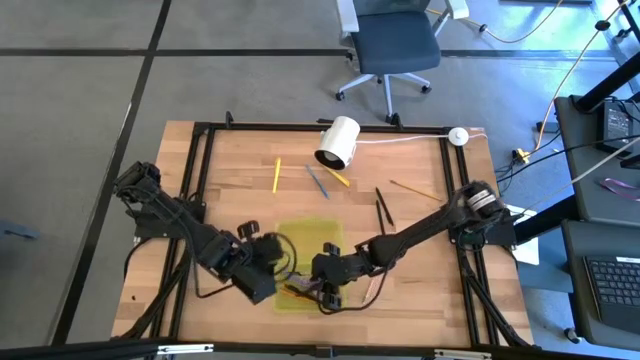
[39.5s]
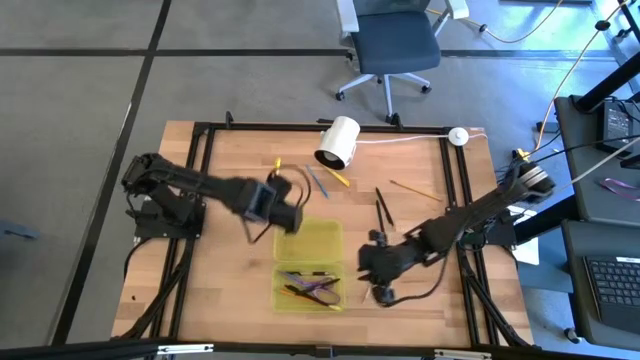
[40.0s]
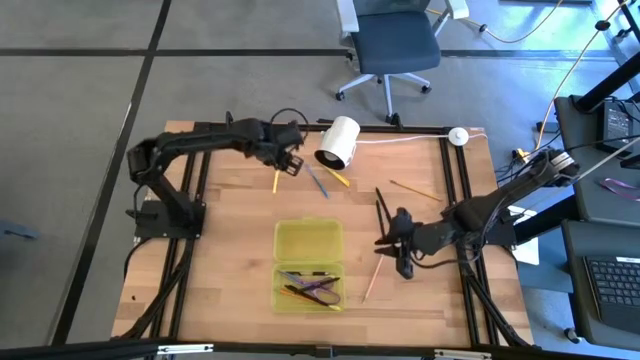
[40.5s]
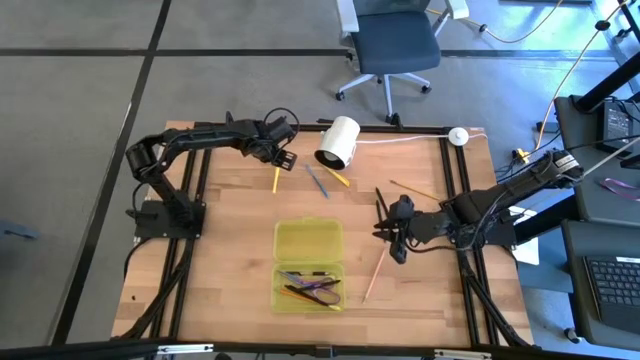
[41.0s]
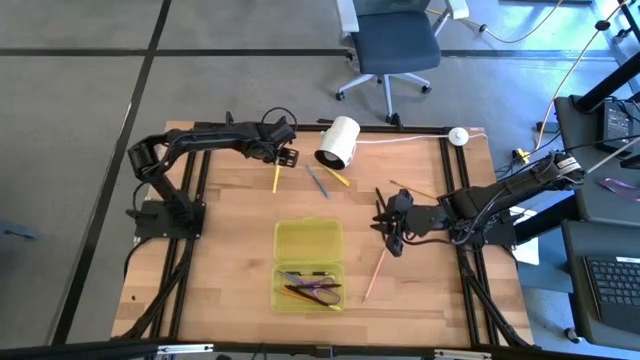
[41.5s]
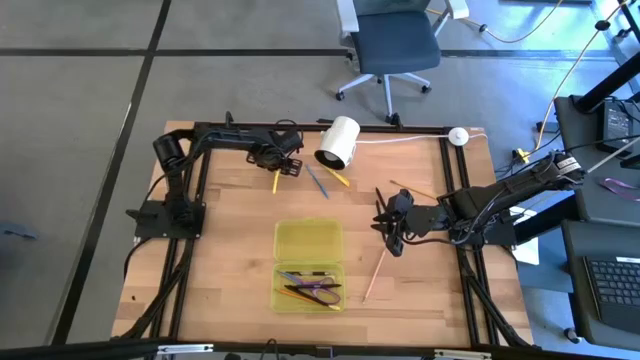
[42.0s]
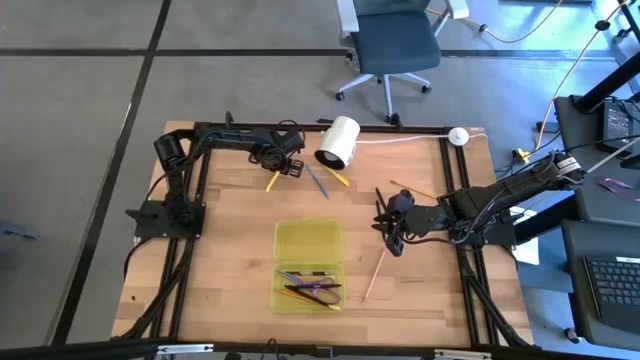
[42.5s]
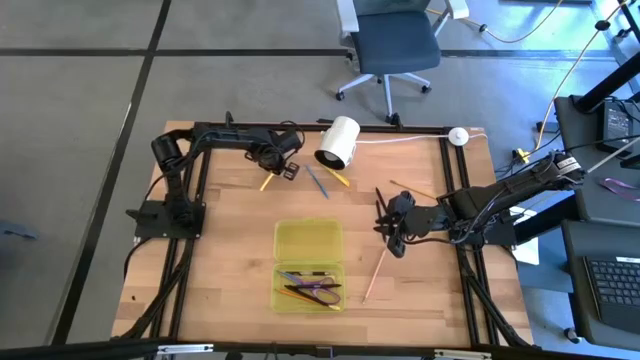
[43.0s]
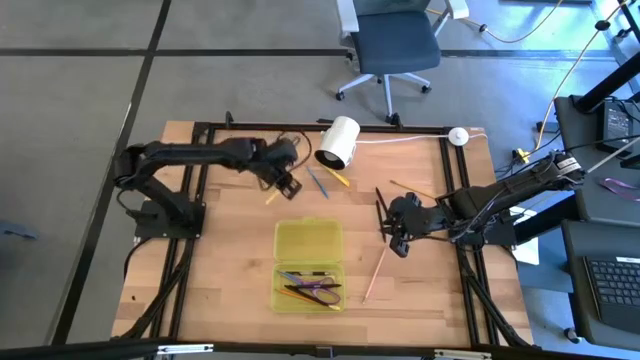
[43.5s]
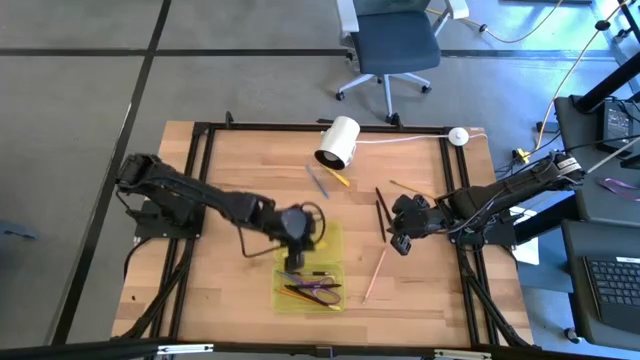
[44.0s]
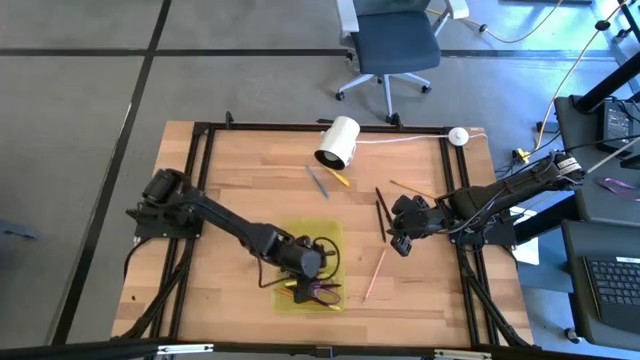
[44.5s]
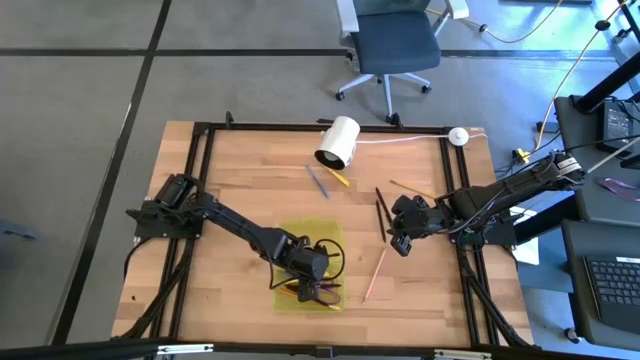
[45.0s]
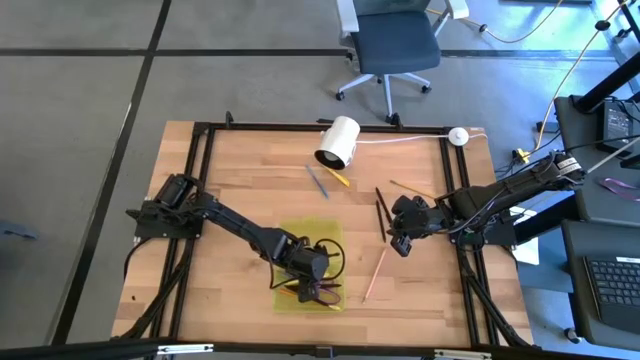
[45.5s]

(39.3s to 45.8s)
Task: Pick & place school supplies into a supply box
Put the yellow pen into the yellow supply box

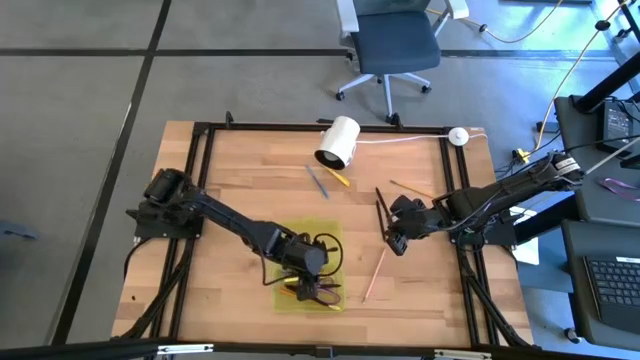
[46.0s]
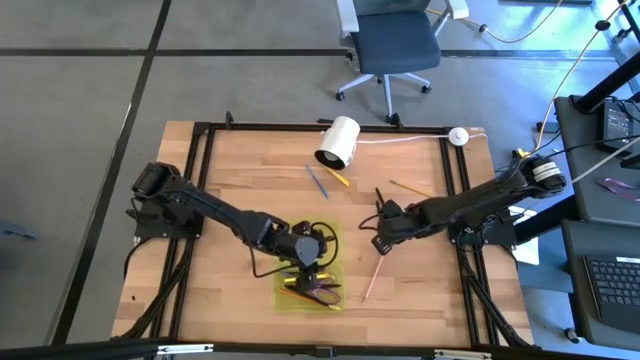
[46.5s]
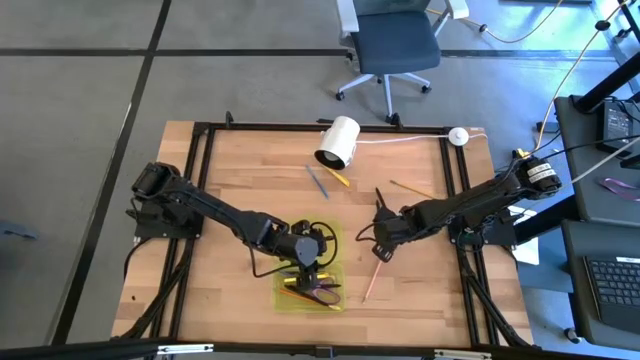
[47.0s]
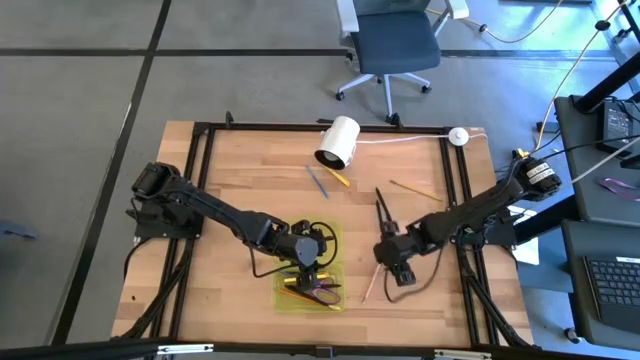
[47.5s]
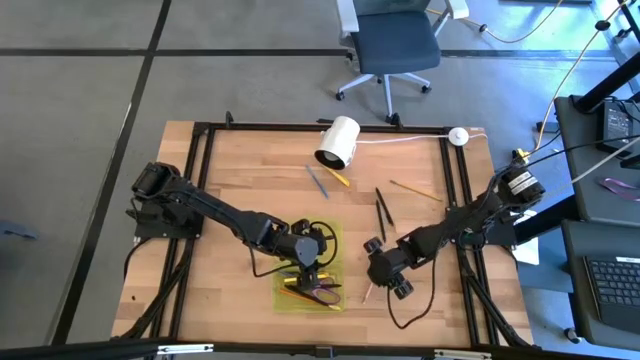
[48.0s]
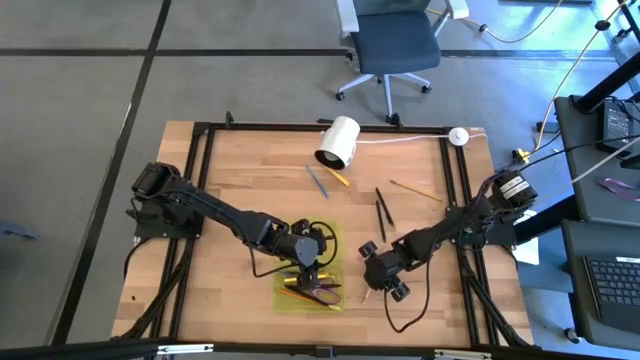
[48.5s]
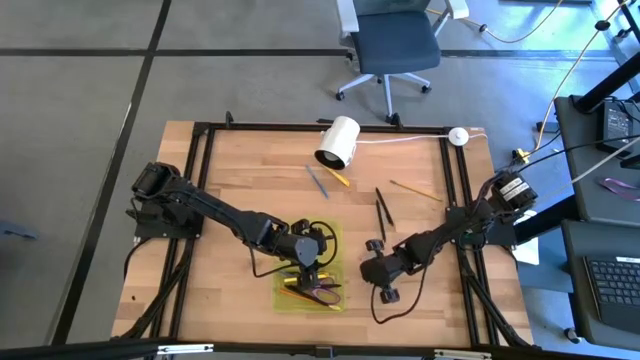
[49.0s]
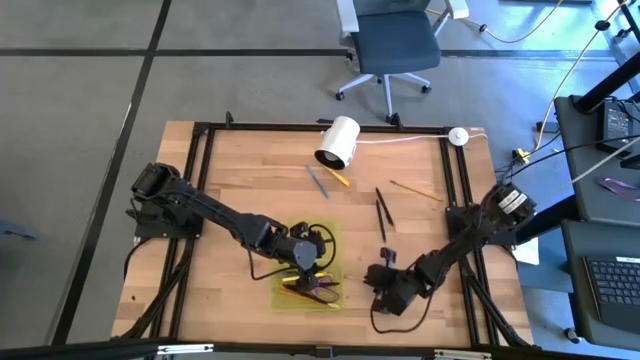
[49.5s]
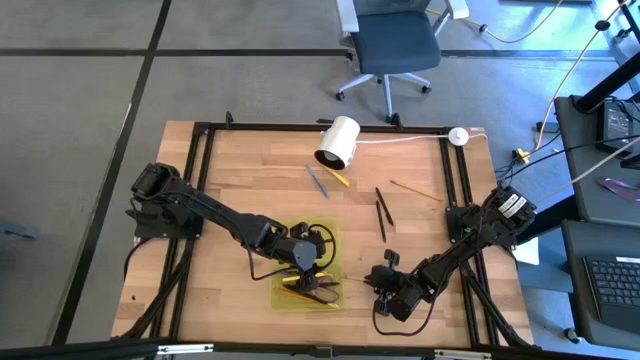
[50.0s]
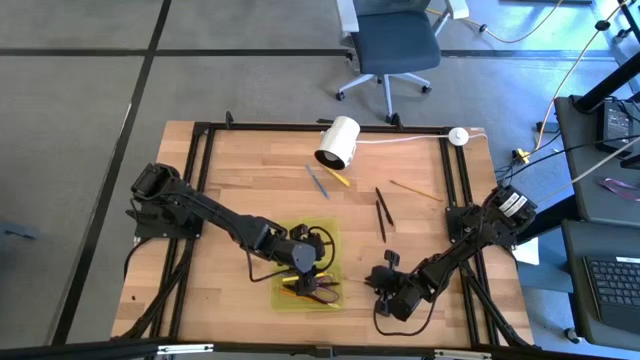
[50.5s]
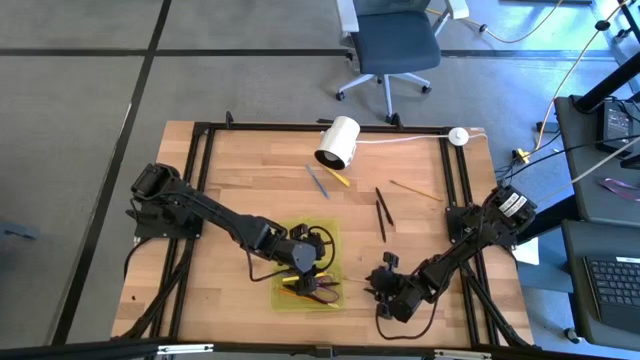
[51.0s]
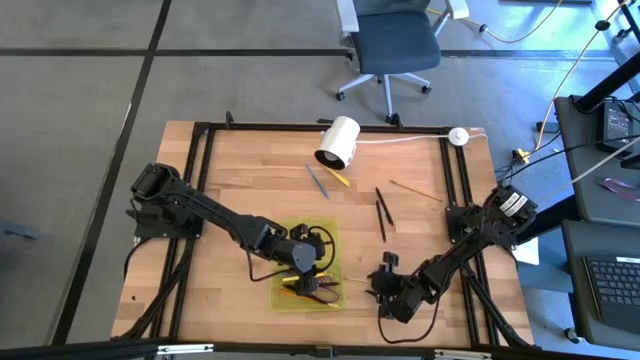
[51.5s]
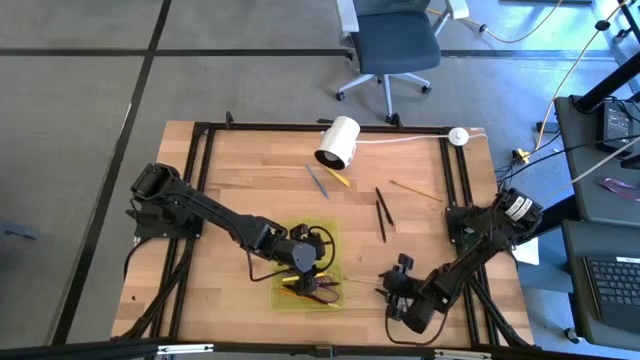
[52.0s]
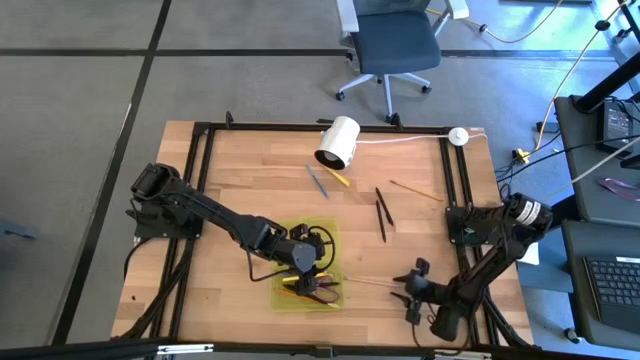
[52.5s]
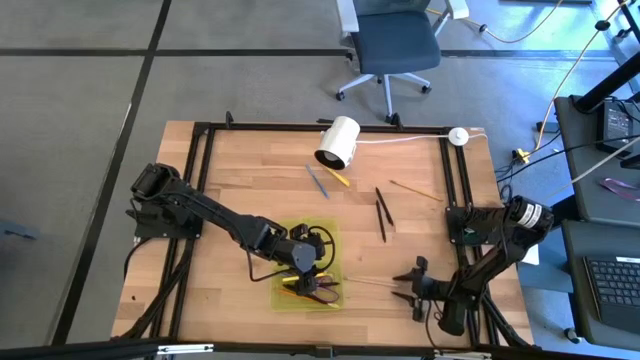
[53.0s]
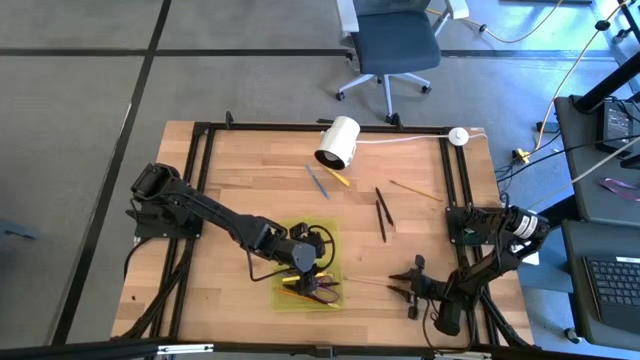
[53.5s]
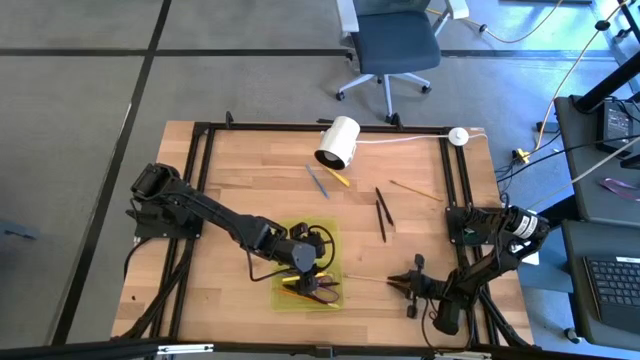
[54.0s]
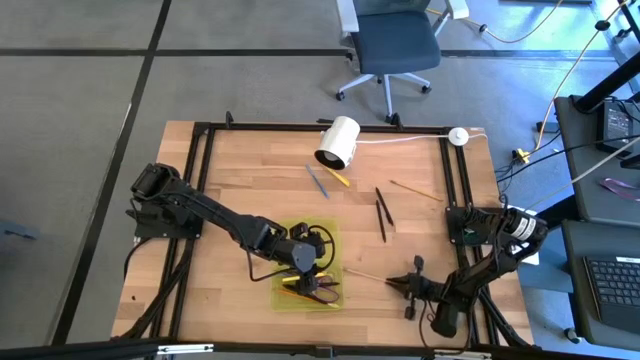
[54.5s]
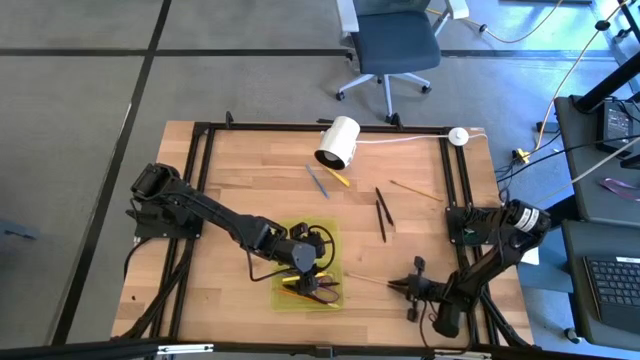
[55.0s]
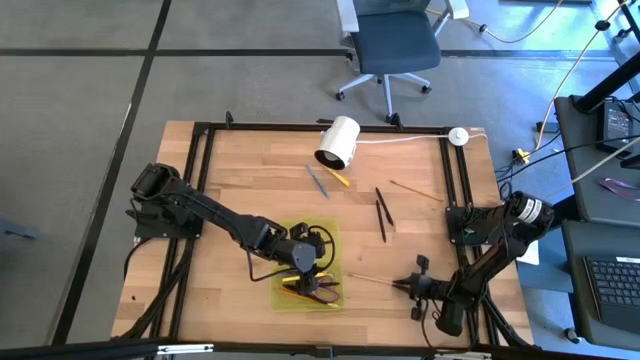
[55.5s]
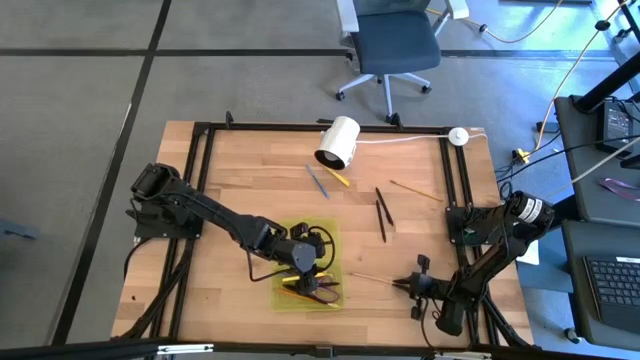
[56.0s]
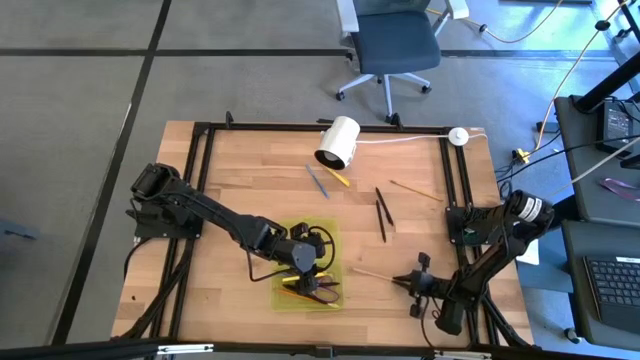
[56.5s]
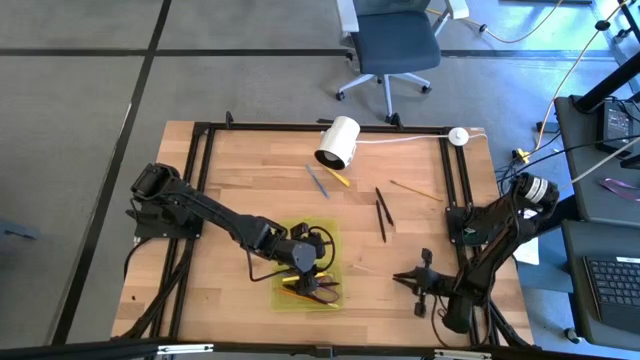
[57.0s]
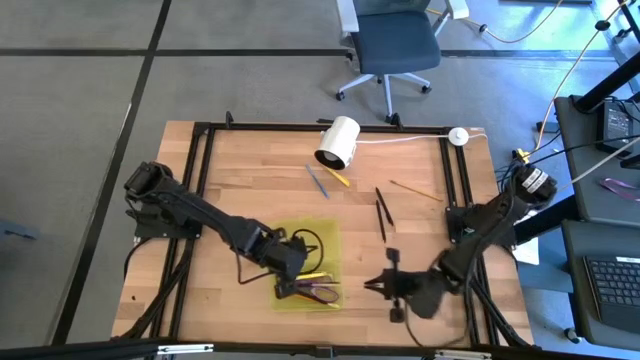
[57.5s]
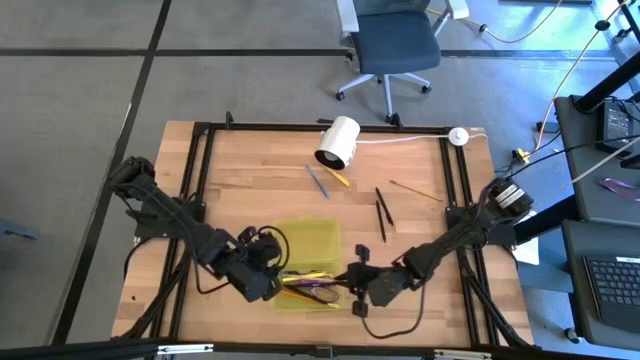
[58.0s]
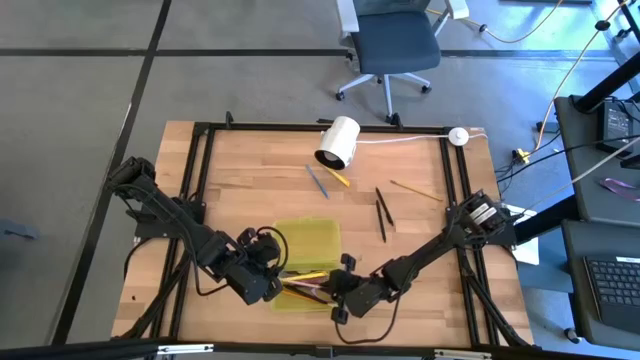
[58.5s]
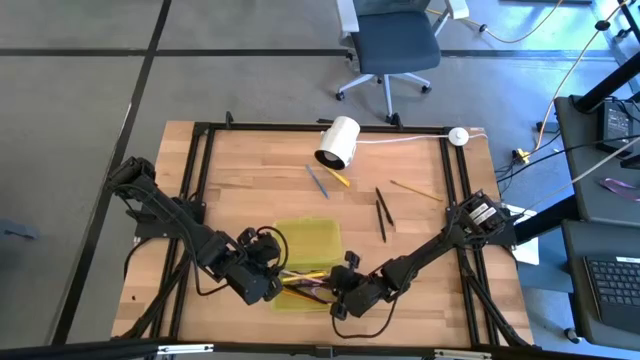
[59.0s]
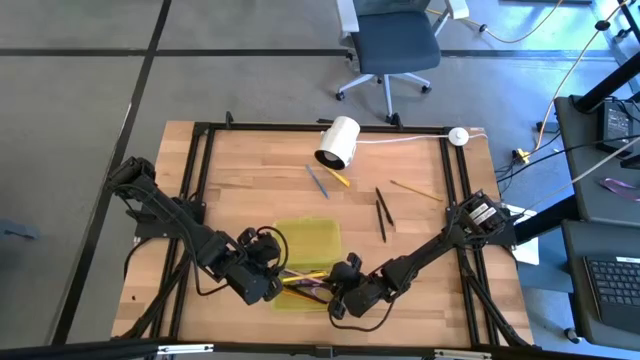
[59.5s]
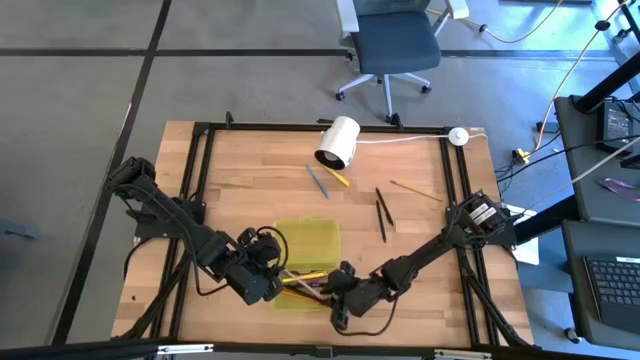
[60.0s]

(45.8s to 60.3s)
Put the pink pencil into the yellow supply box
